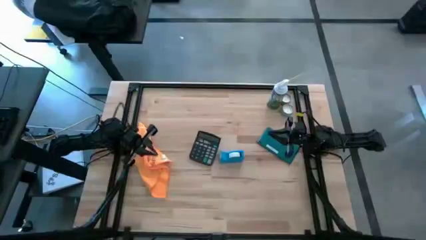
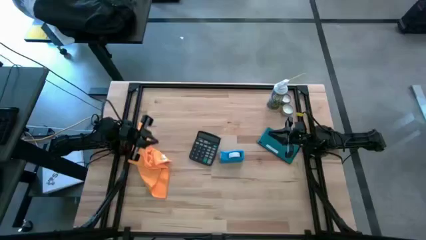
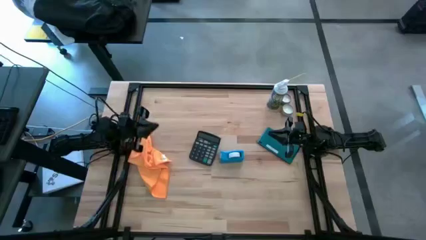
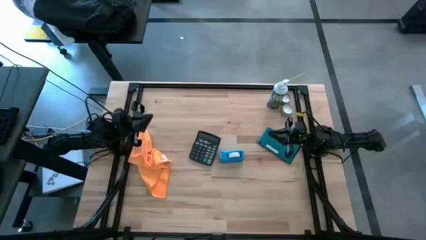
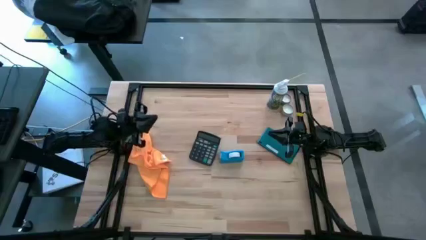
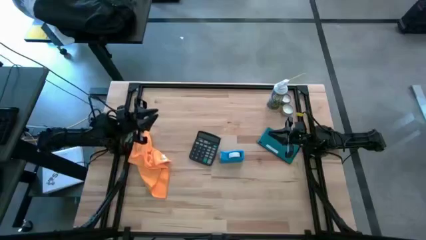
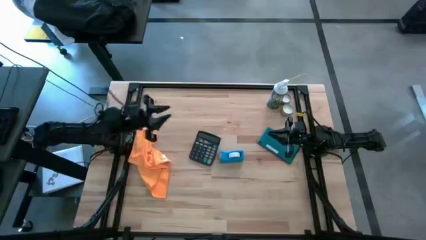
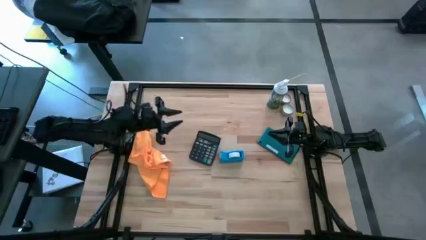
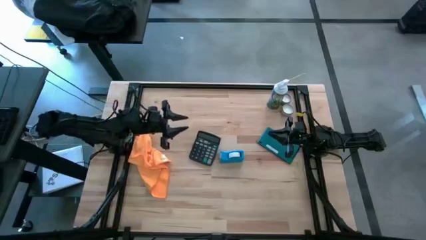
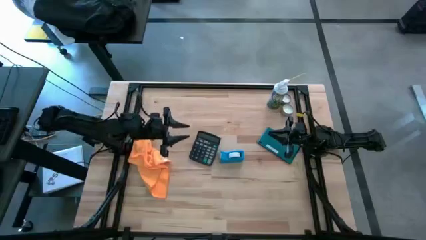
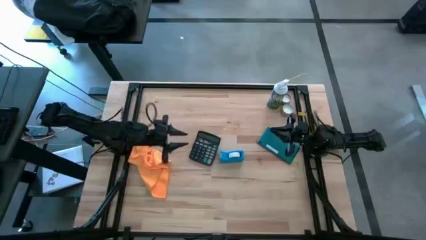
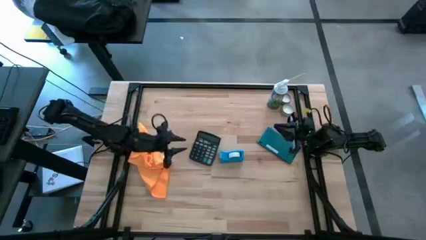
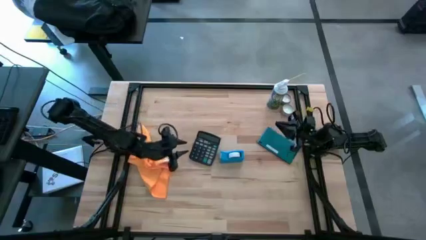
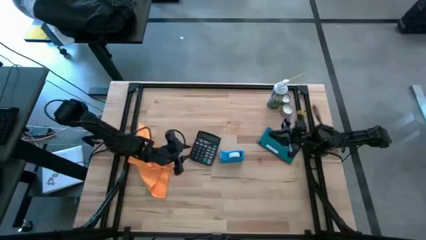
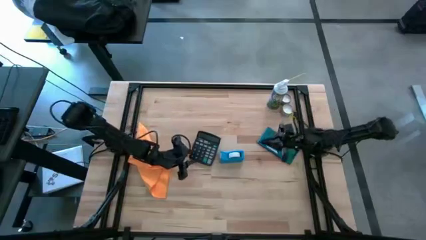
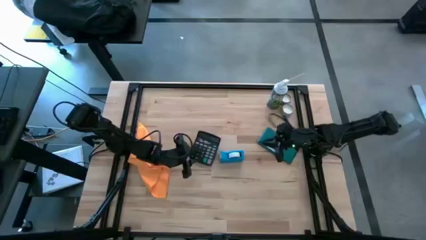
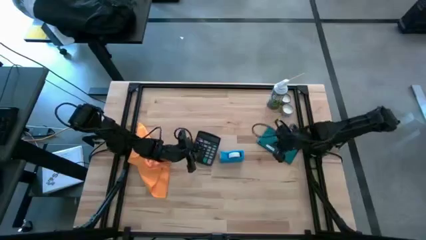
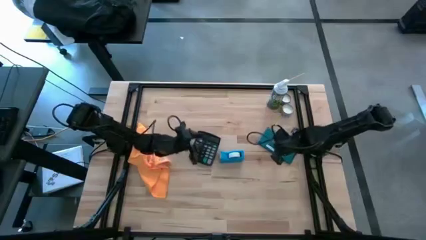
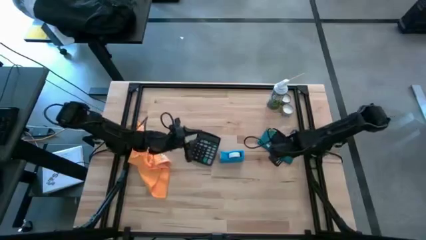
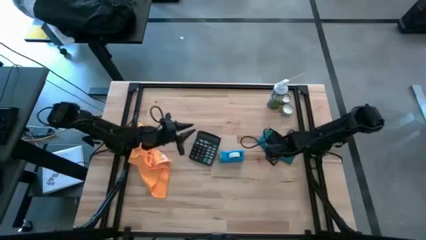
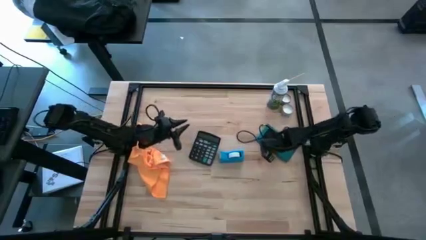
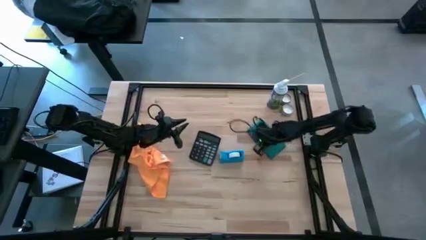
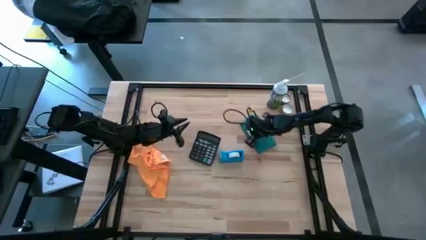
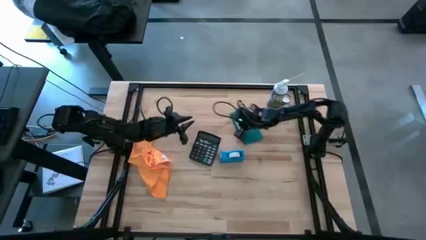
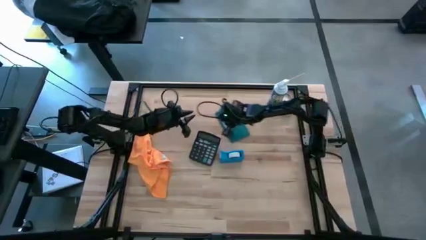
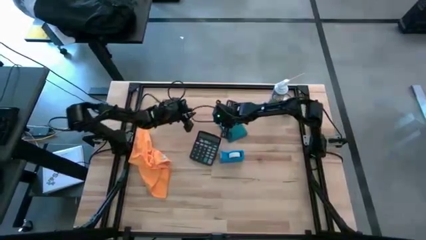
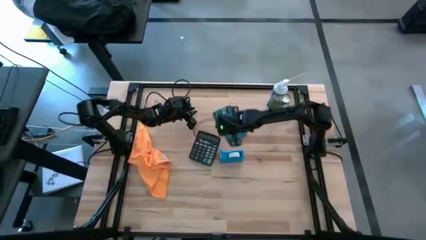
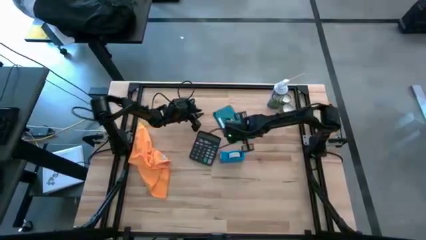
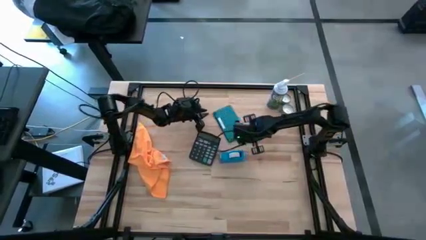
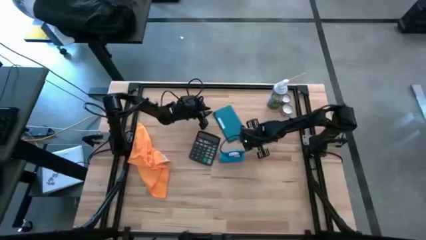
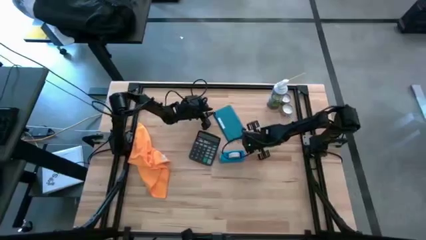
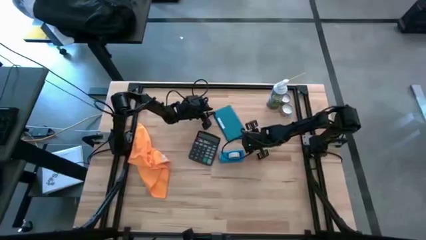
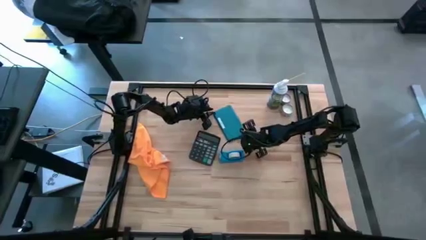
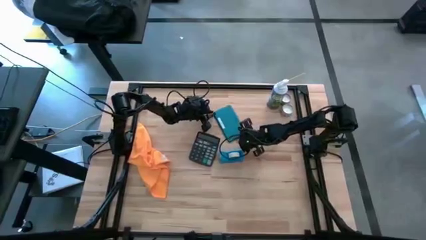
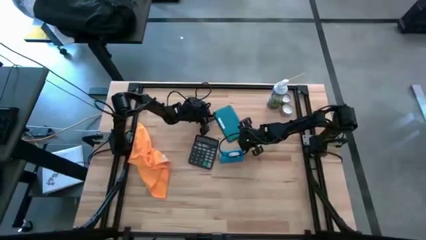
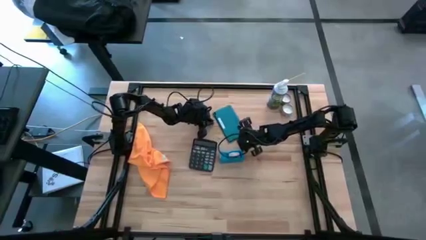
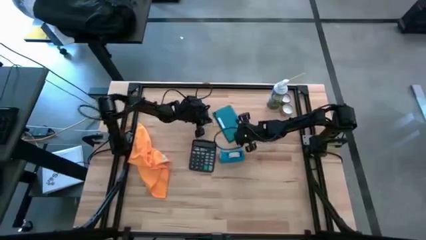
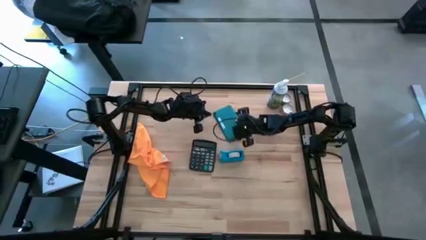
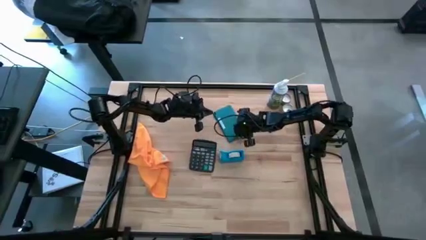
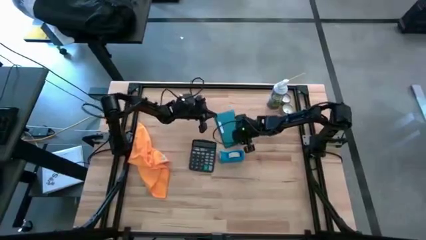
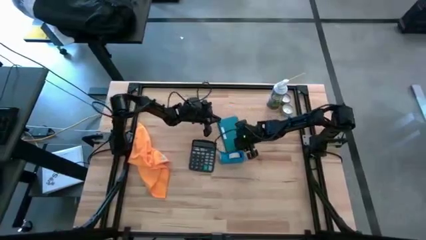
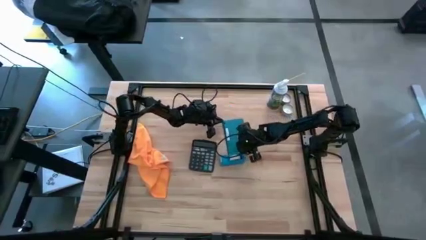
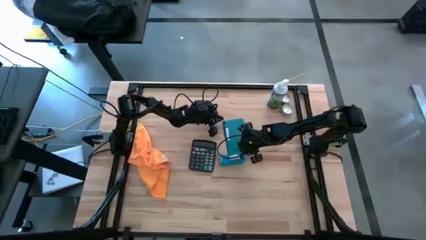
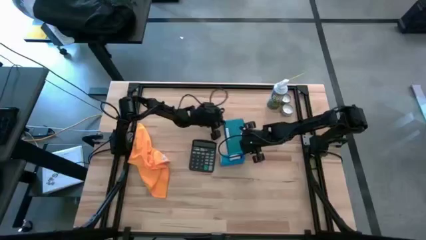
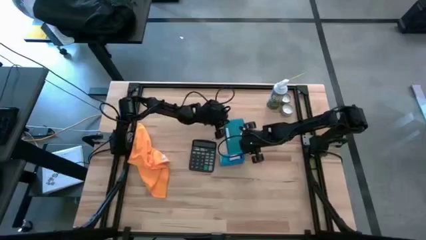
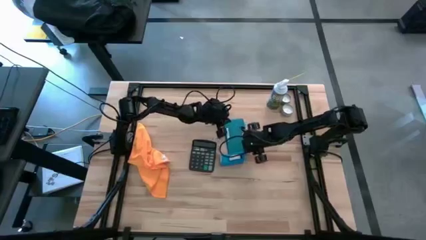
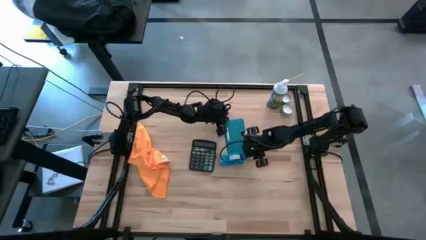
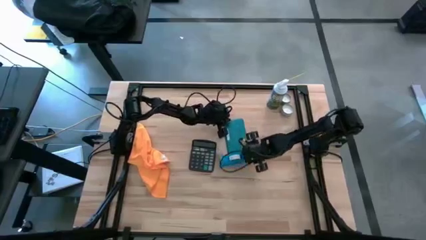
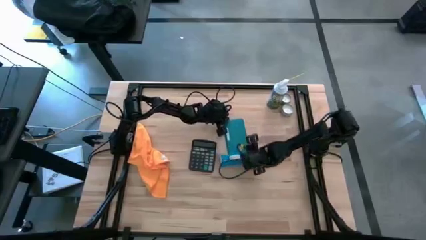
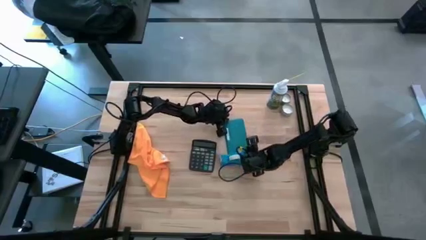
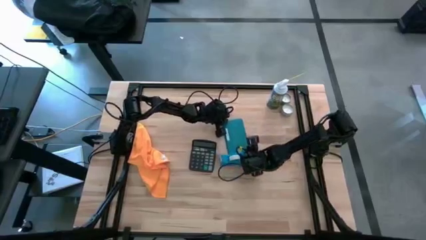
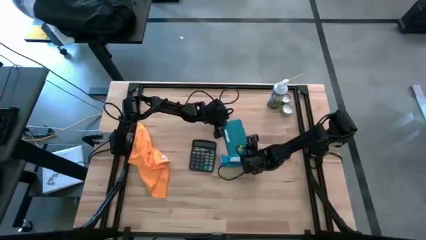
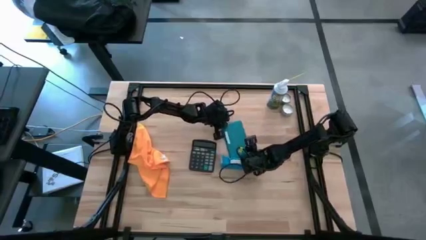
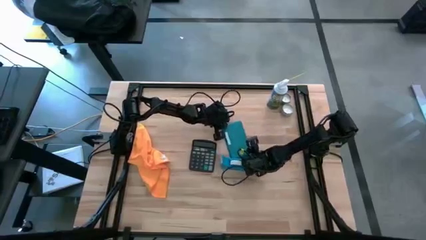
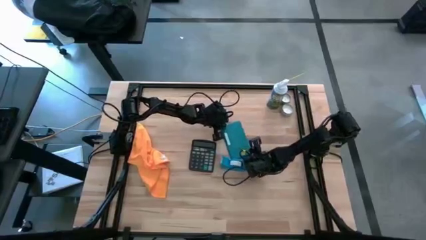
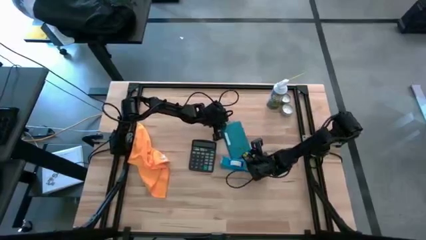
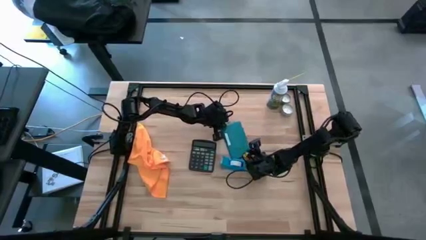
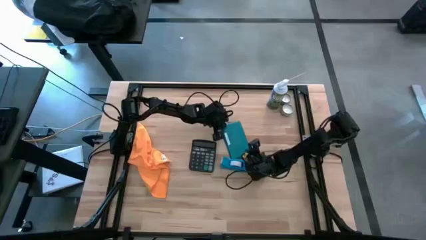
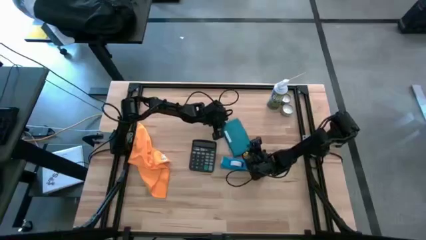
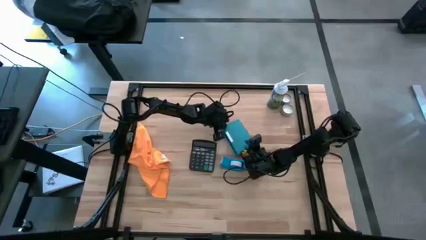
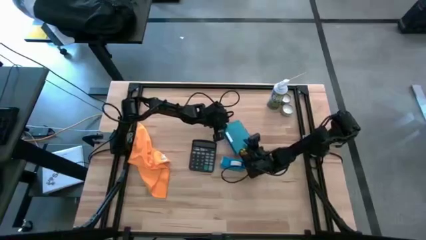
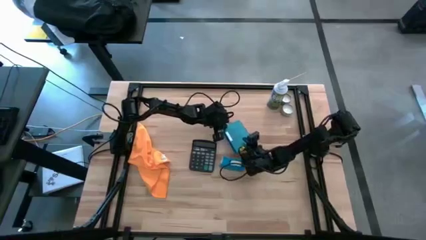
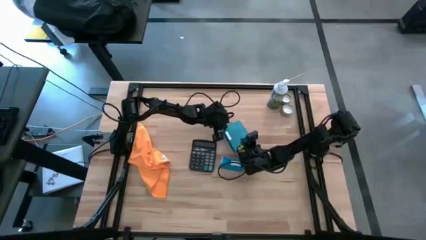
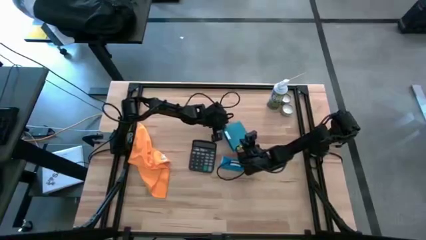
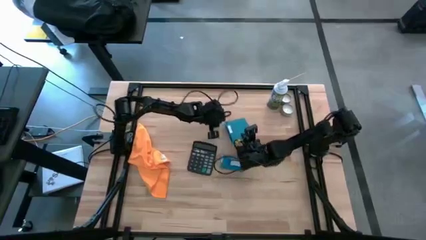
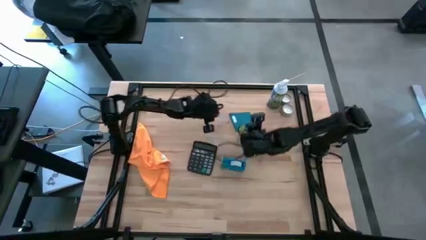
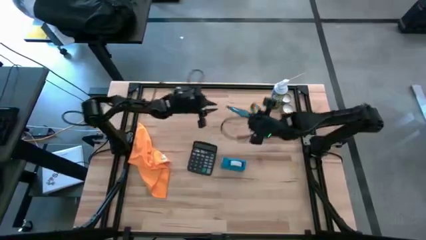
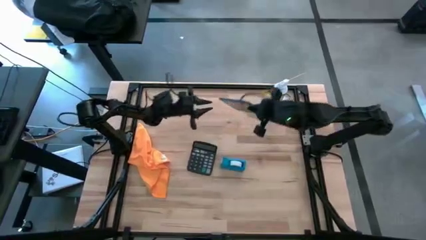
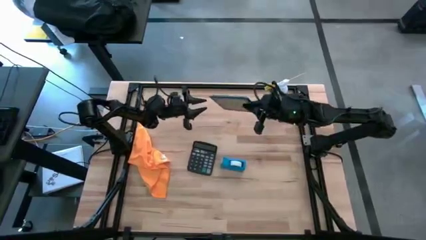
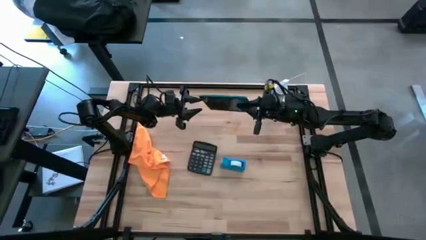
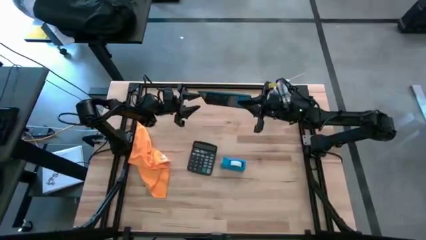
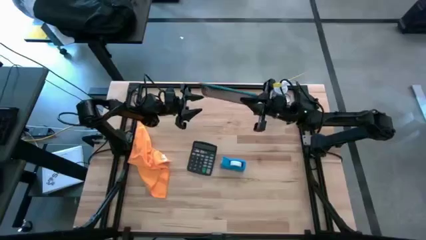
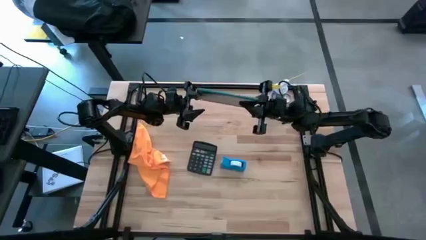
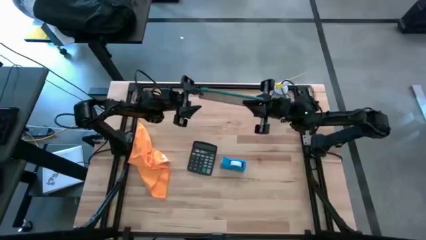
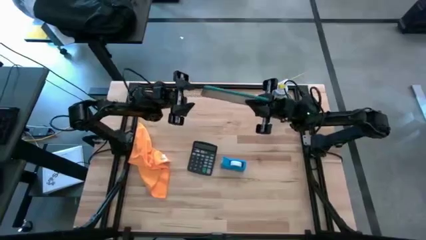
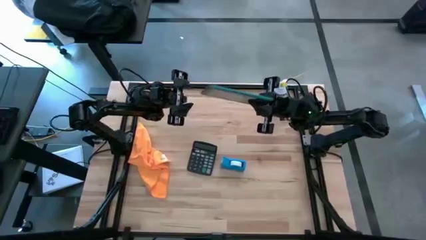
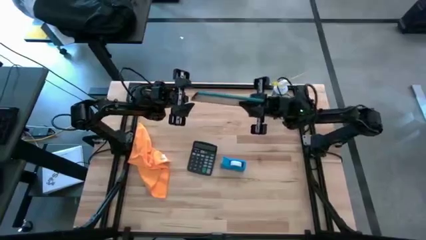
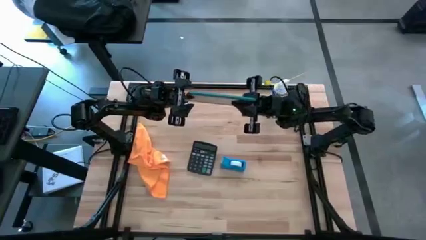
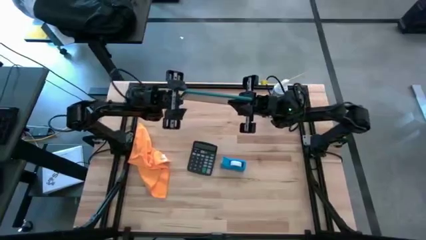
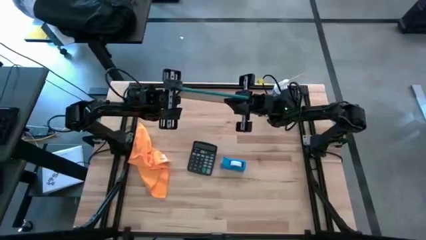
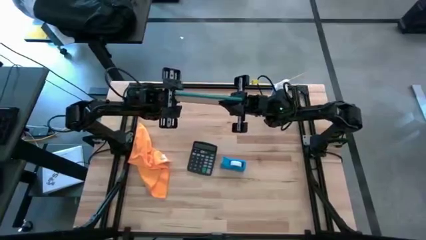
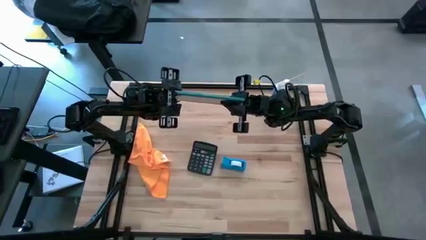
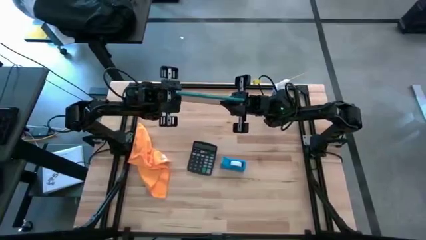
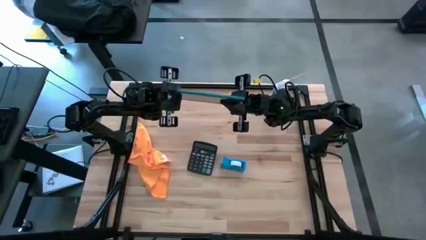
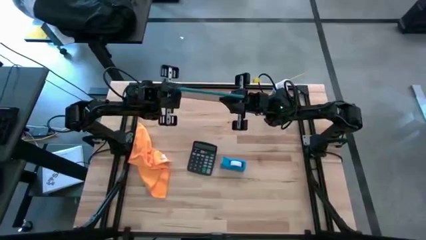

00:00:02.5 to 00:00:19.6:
Task: Apply microfiber cloth
Spray the front of the cellphone with spray bottle
